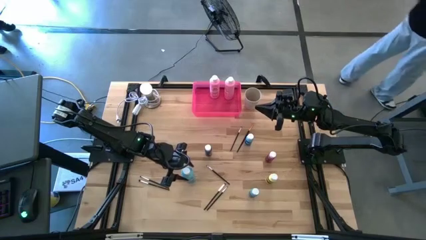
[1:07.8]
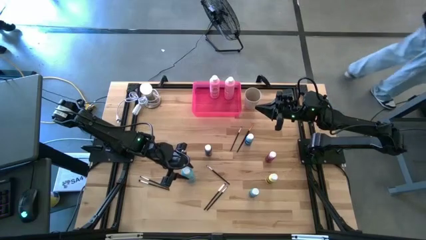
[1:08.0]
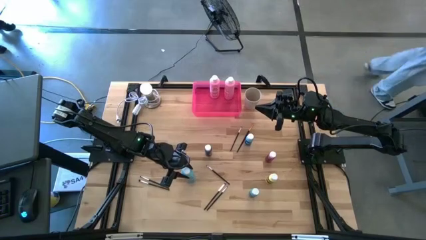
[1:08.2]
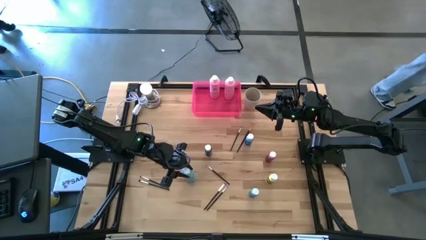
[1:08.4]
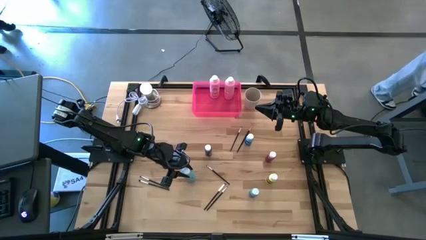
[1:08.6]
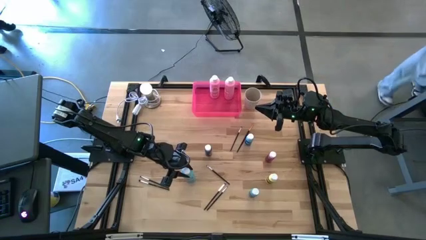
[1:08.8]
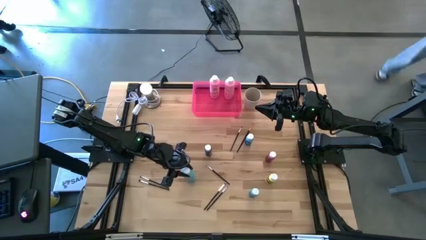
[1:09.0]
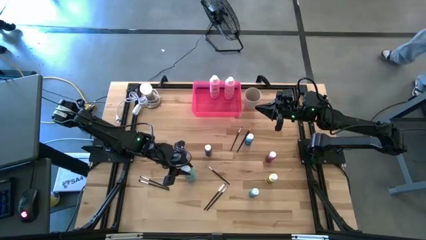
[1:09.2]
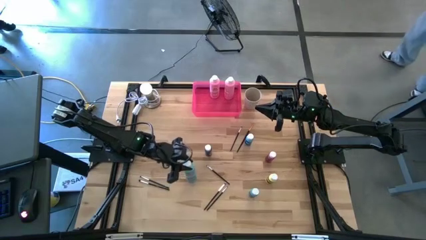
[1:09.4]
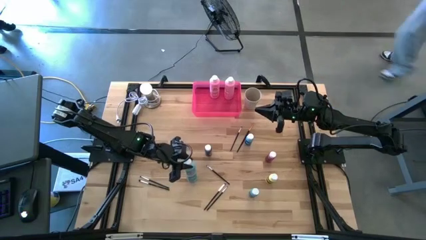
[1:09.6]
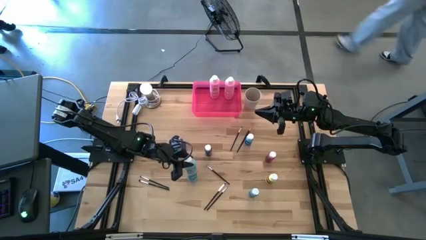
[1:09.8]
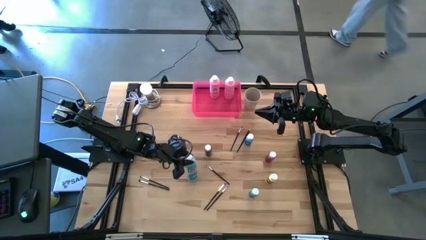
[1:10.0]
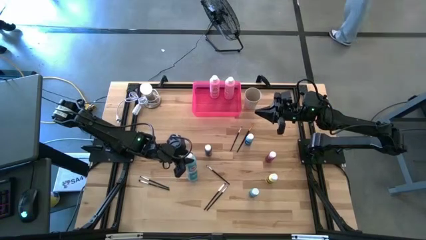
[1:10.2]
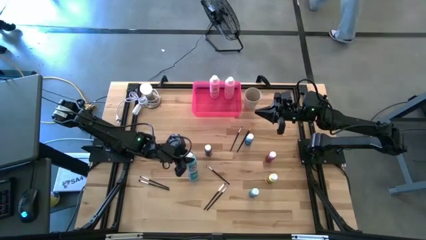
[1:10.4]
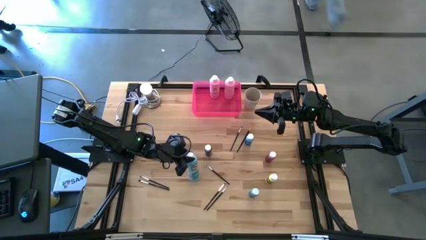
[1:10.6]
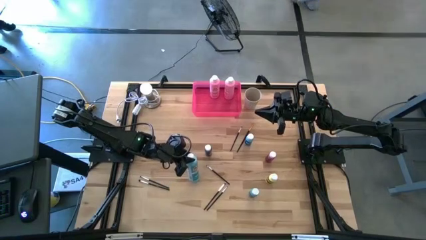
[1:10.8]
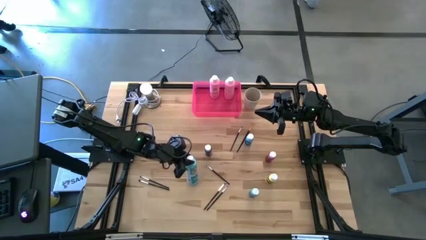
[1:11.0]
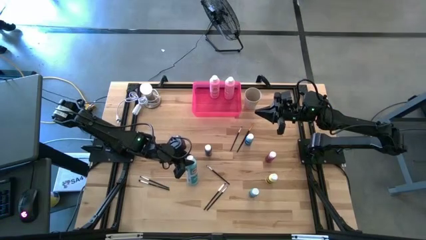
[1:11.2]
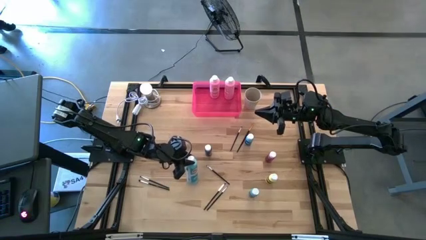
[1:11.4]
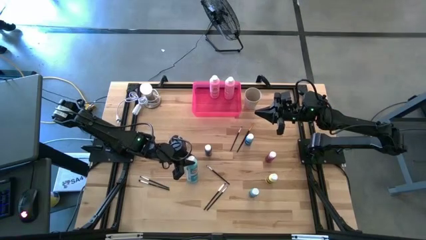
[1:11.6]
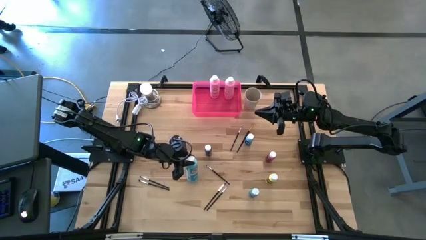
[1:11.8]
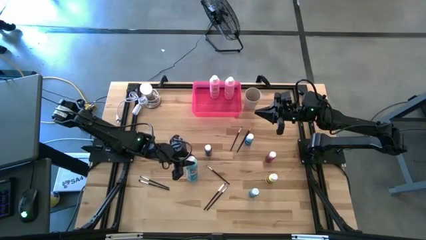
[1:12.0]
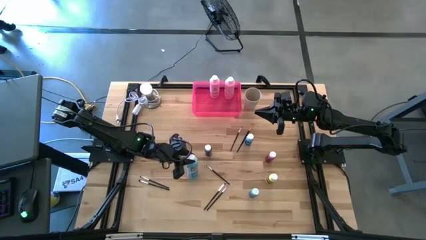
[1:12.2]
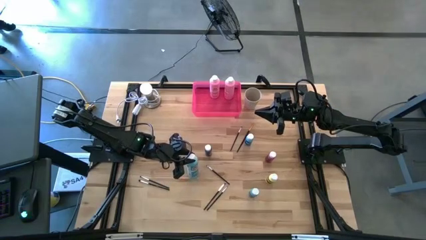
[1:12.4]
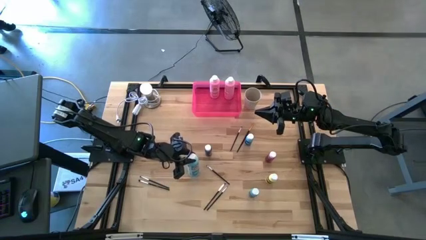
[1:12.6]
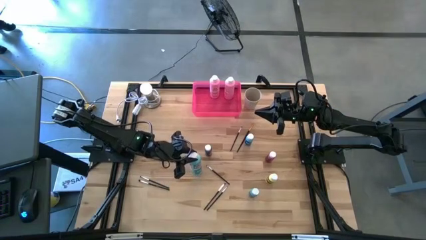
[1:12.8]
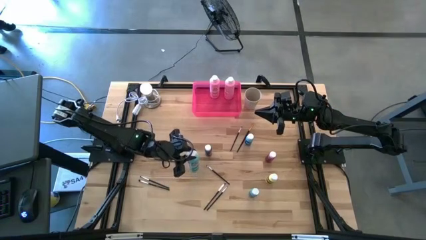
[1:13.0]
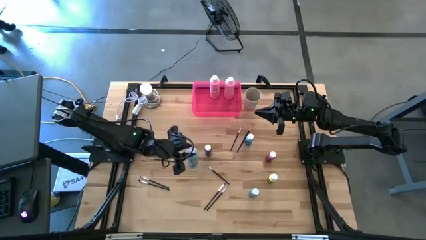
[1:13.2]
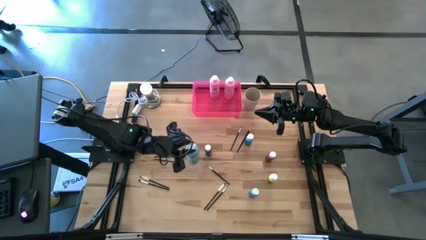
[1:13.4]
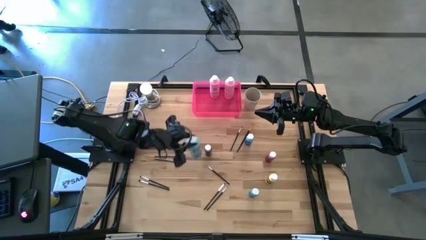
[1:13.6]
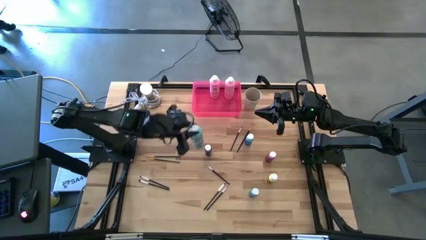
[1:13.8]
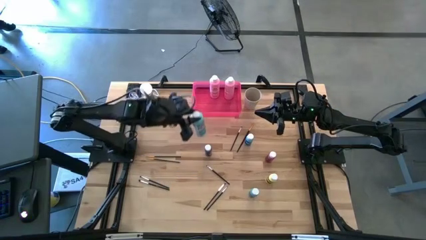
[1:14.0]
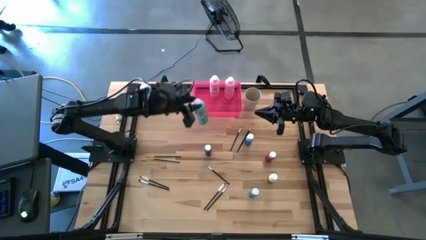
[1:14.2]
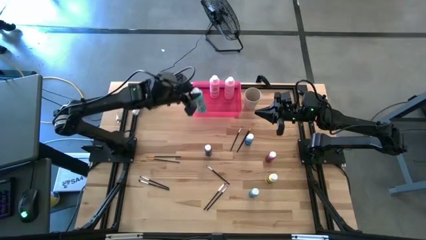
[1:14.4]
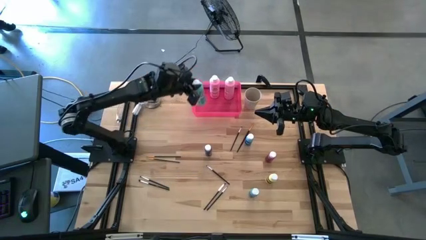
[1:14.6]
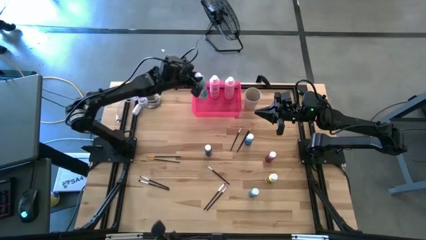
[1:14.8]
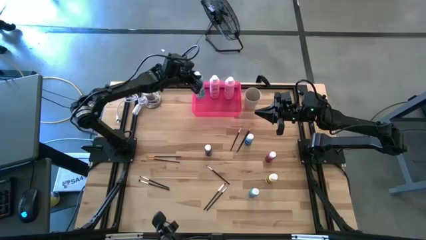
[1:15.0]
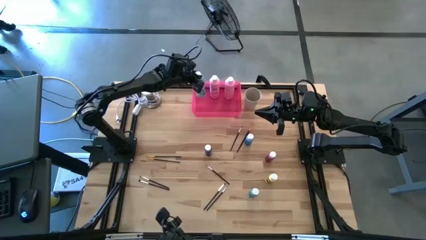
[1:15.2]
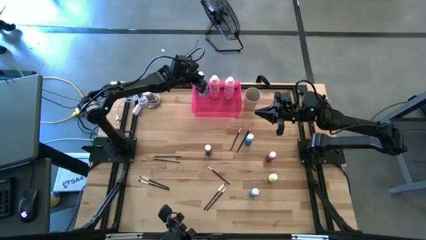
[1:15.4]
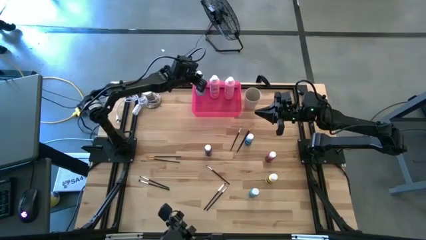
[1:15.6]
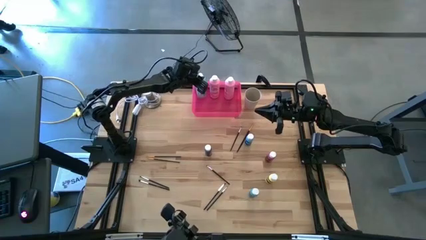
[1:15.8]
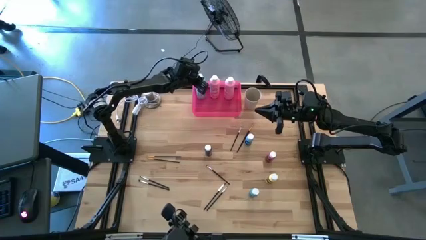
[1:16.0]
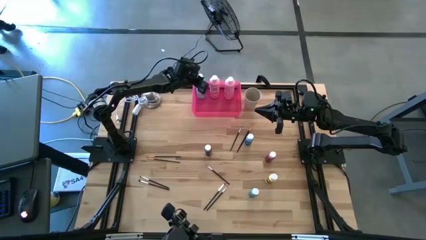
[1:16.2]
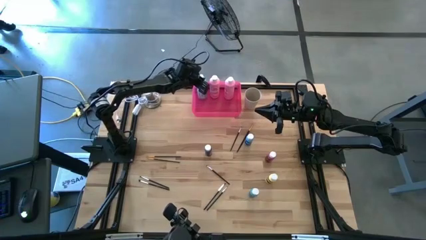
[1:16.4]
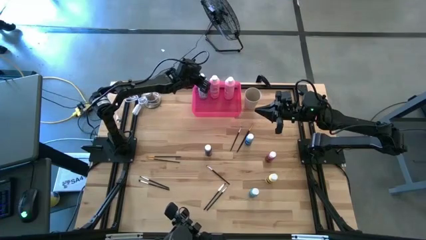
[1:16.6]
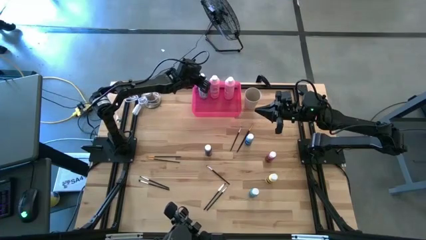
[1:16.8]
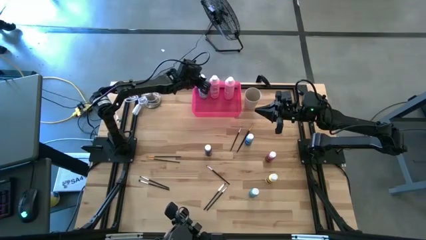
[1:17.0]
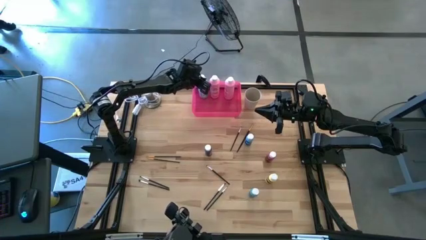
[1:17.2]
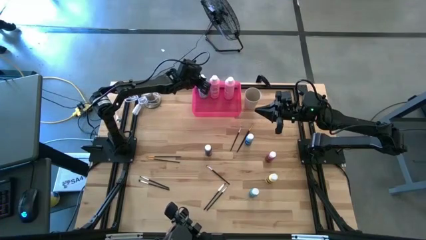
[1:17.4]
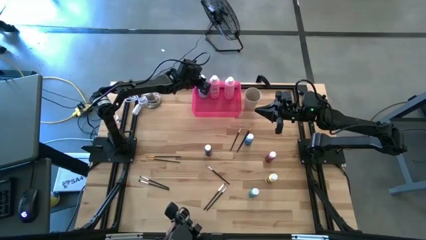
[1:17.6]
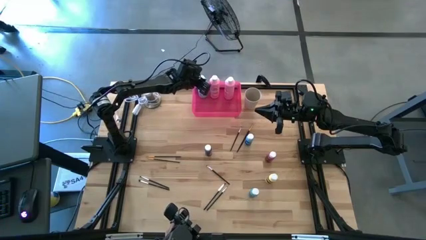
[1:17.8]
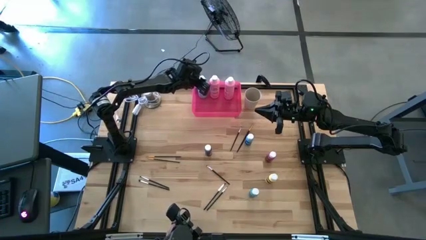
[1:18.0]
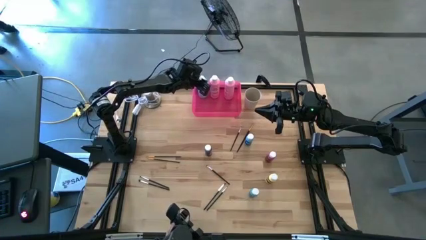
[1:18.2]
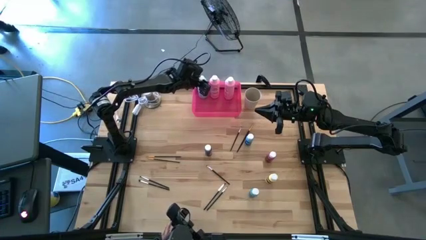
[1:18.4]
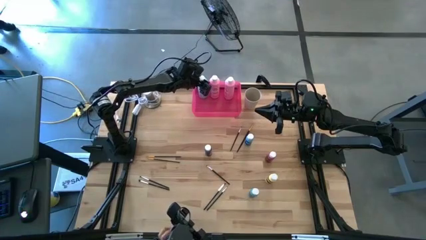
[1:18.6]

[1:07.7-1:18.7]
Task: Pick & Place Paint Supplies
Put the big blue paint bottle into the pink bin
